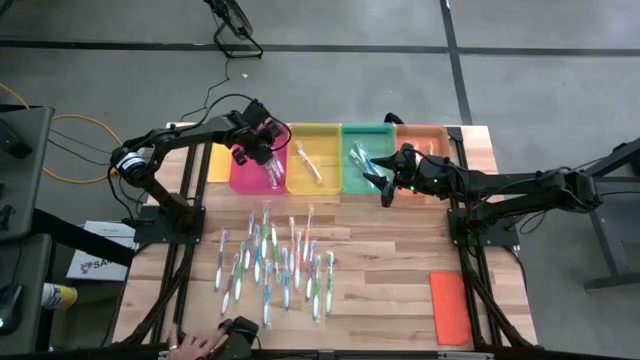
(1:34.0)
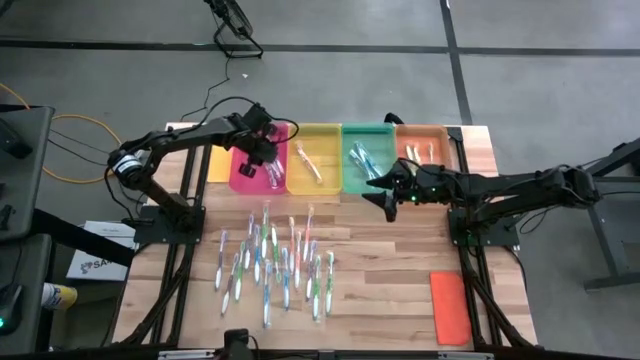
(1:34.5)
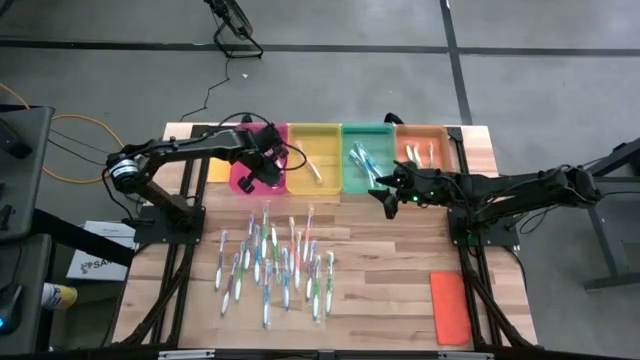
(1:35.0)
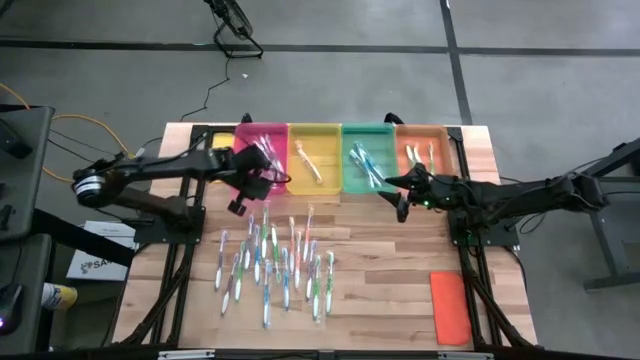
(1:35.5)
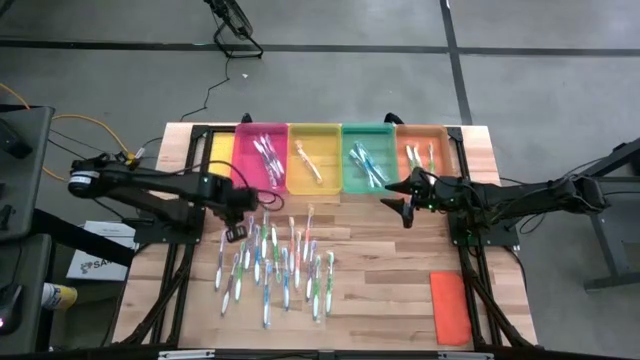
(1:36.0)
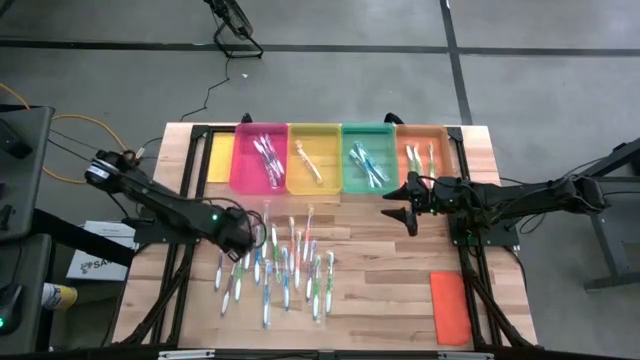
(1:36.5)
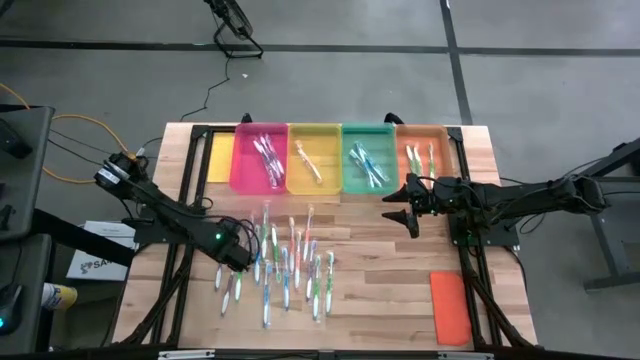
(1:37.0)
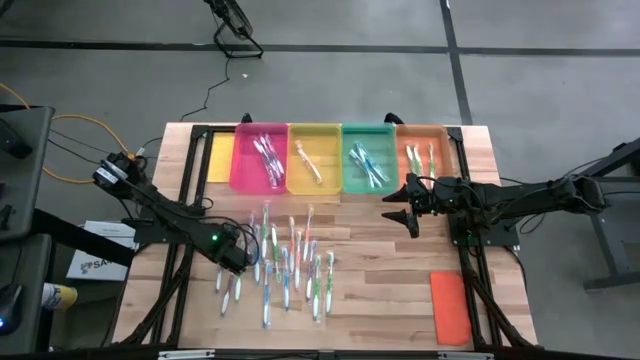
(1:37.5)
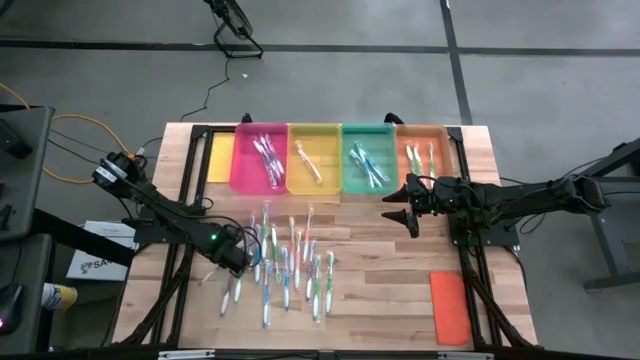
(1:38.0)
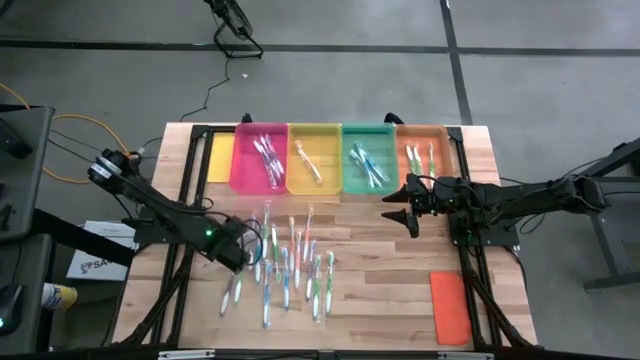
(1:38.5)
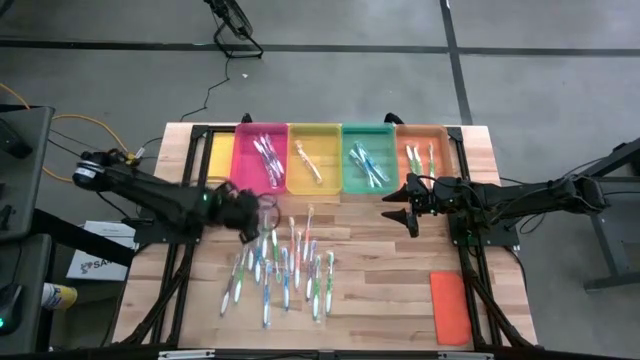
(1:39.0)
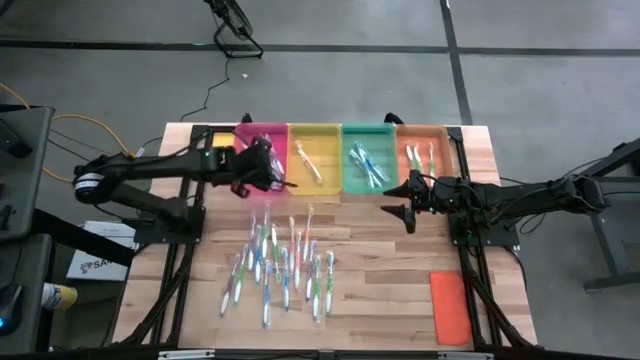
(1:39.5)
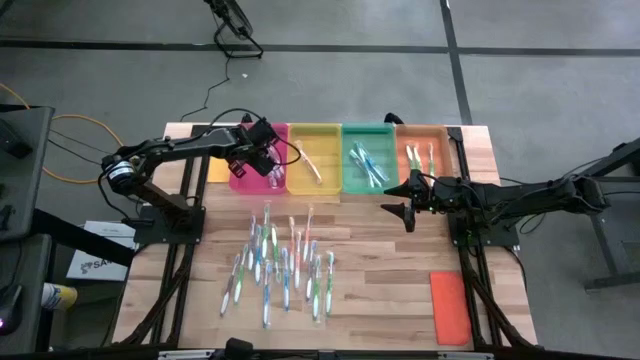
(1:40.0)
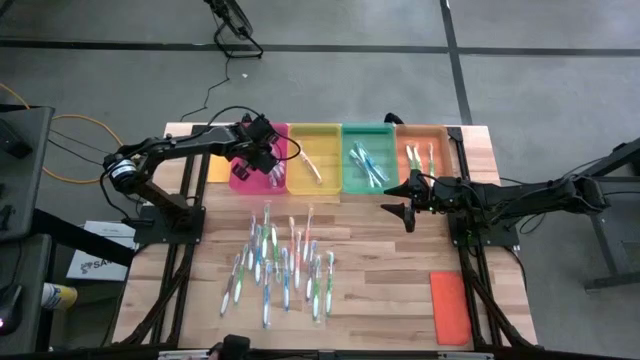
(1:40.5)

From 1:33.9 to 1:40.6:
Task: Pick & Place Toothbrushes
Put the purple toothbrush into the pink bin

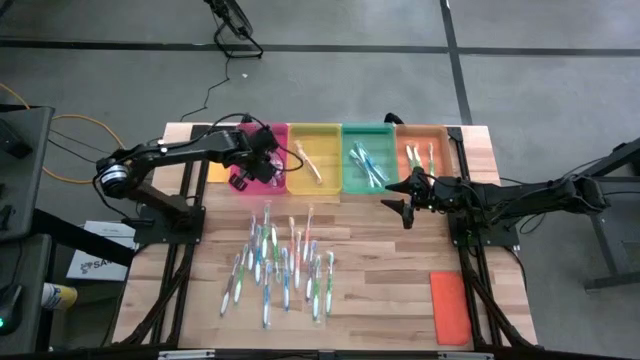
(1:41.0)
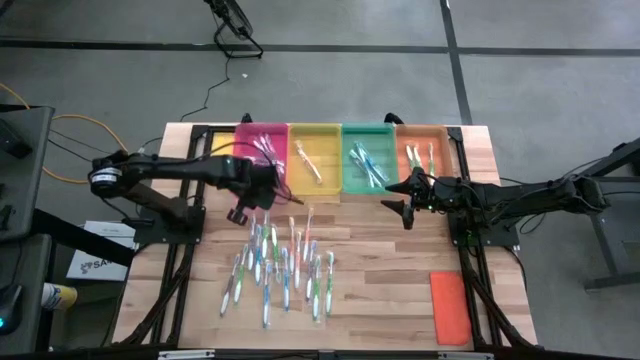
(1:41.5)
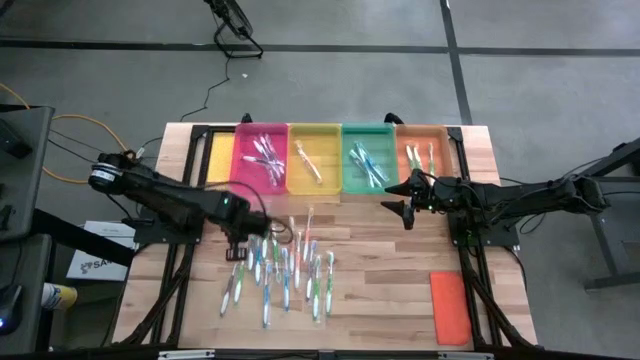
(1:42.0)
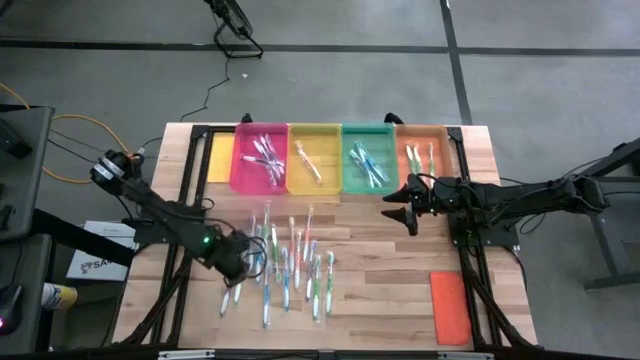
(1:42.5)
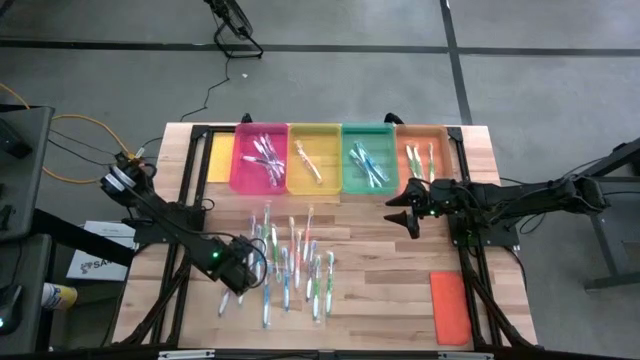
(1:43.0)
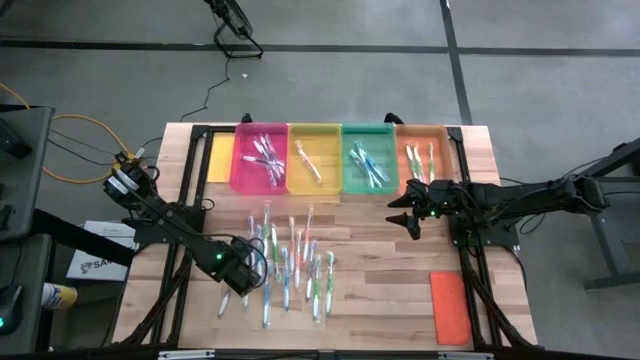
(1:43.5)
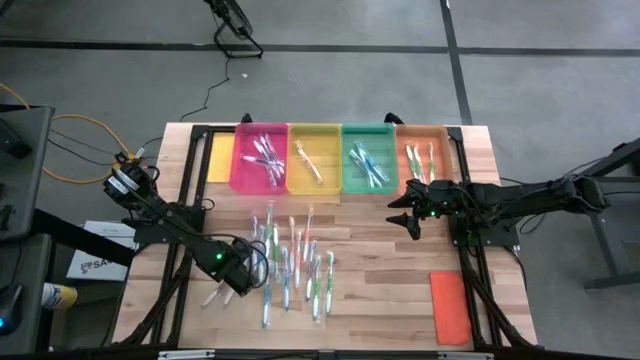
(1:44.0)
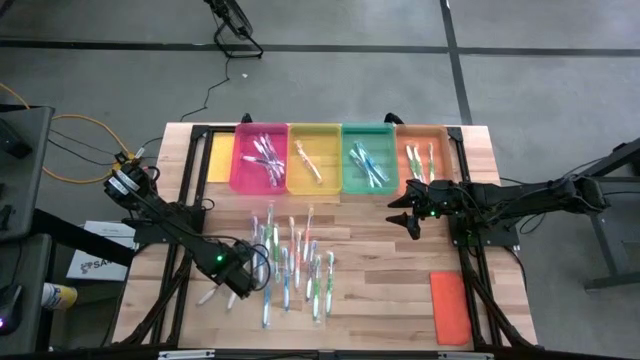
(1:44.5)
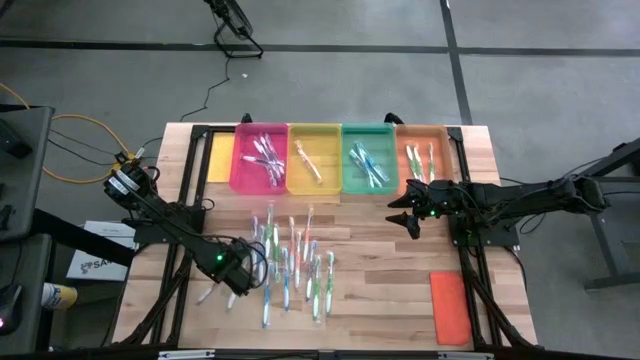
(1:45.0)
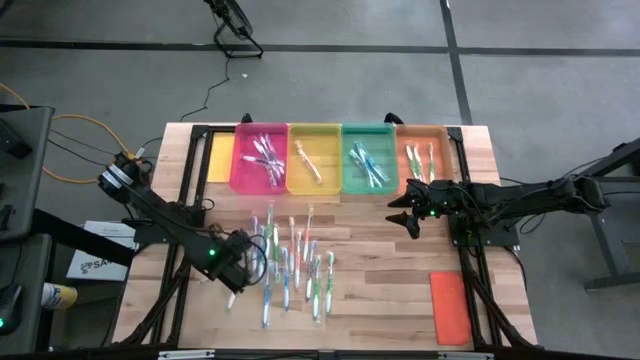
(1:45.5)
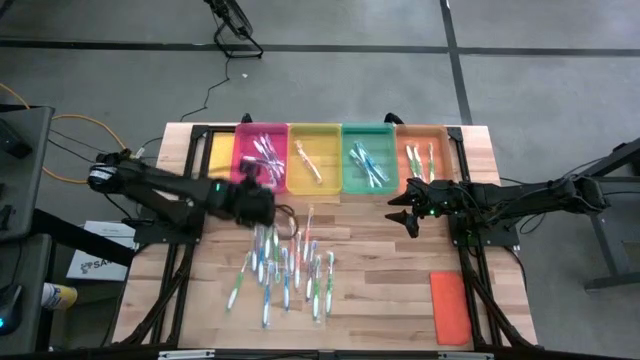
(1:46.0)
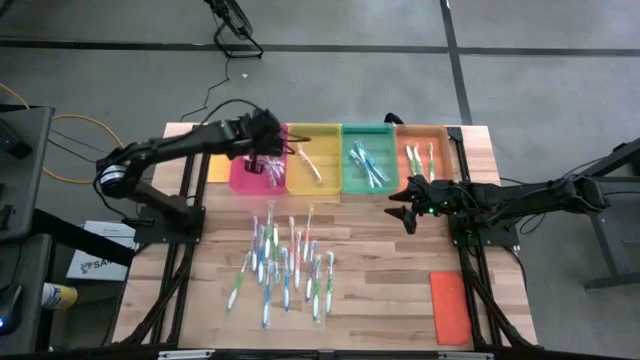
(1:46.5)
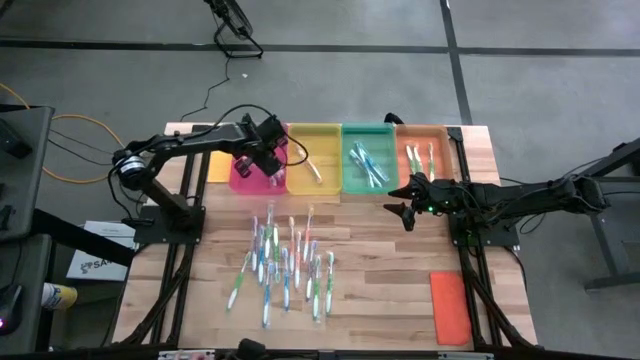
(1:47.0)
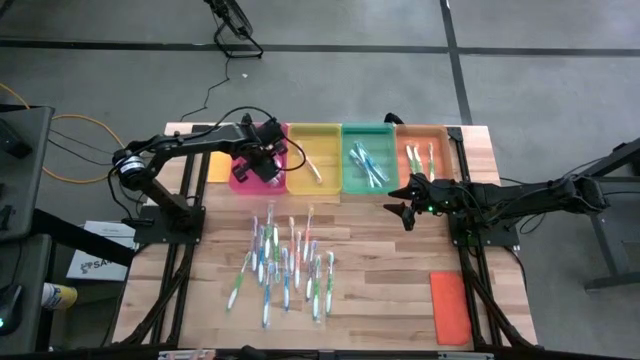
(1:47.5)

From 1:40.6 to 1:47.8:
Put the purple toothbrush into the pink bin

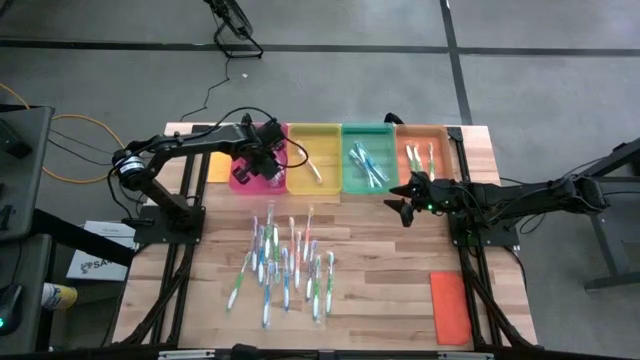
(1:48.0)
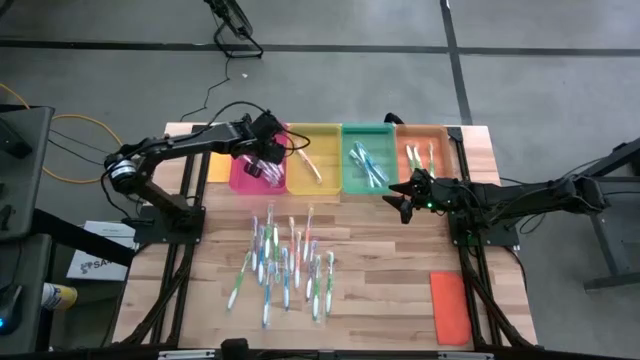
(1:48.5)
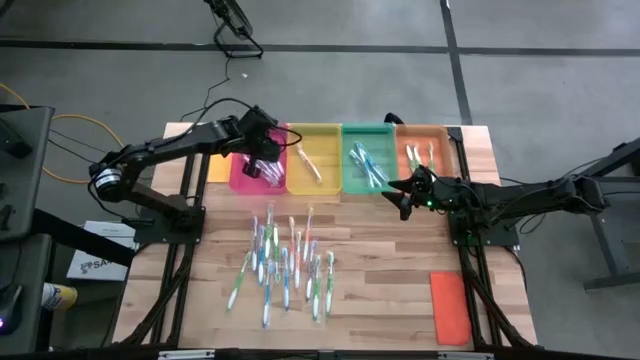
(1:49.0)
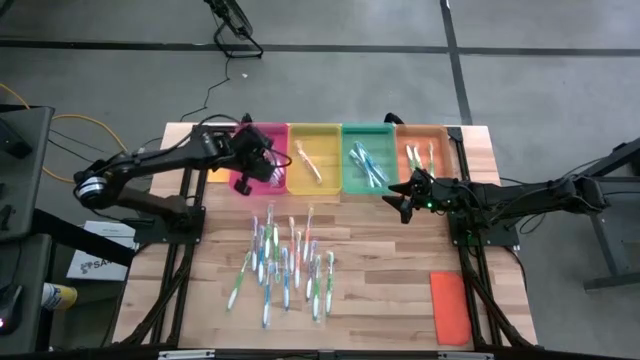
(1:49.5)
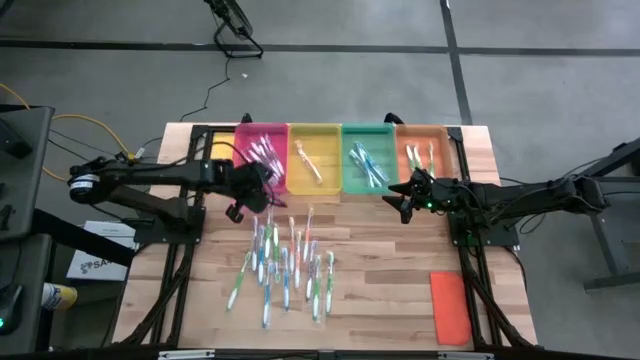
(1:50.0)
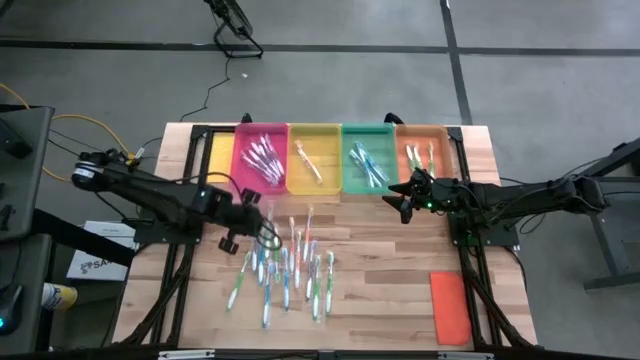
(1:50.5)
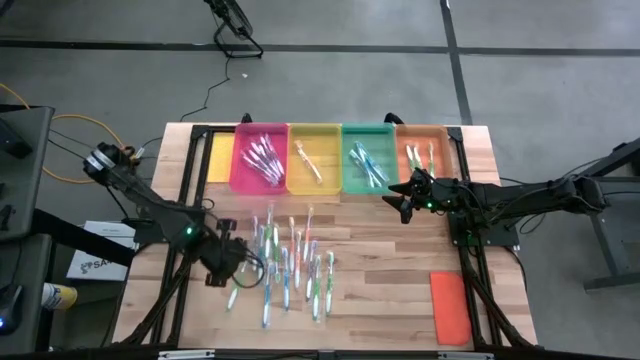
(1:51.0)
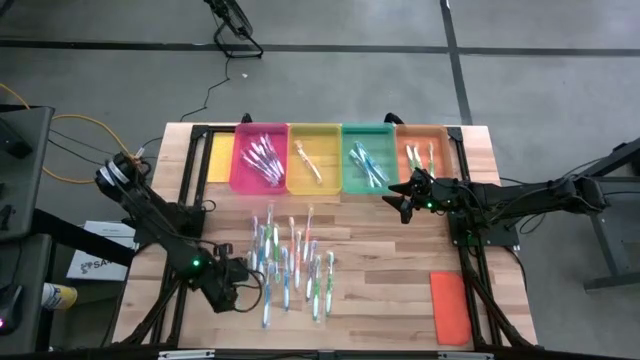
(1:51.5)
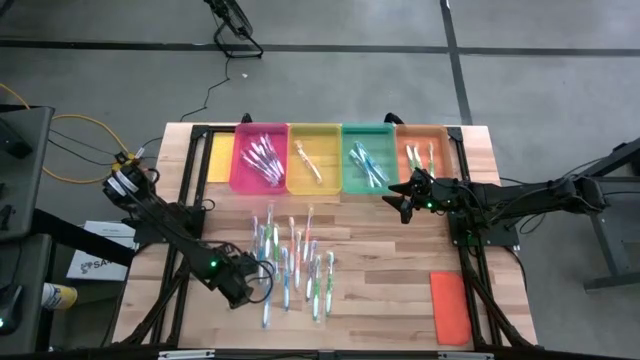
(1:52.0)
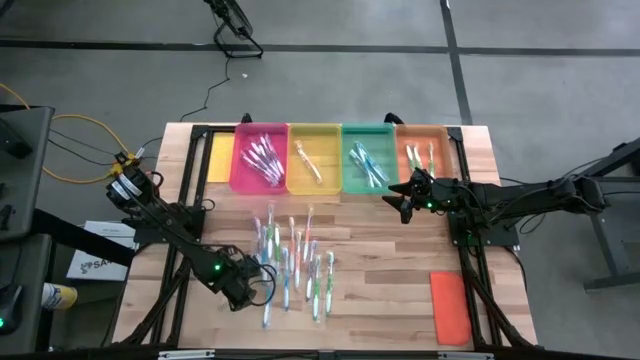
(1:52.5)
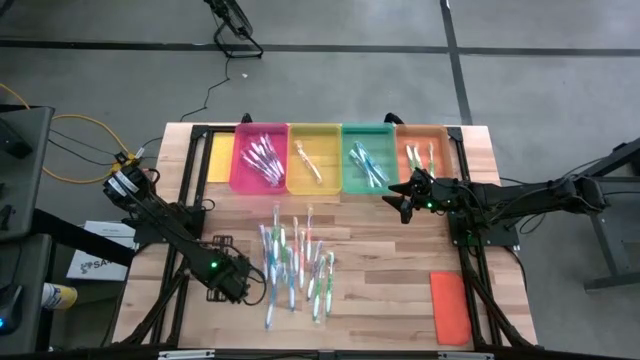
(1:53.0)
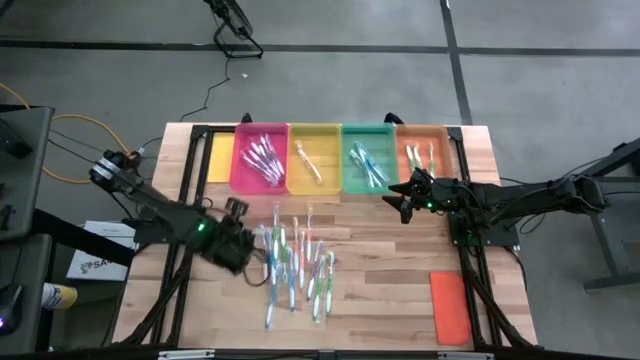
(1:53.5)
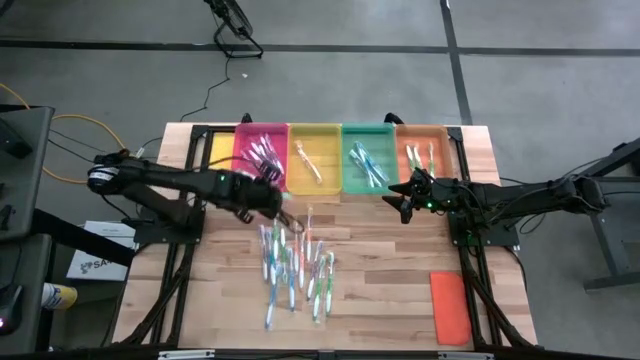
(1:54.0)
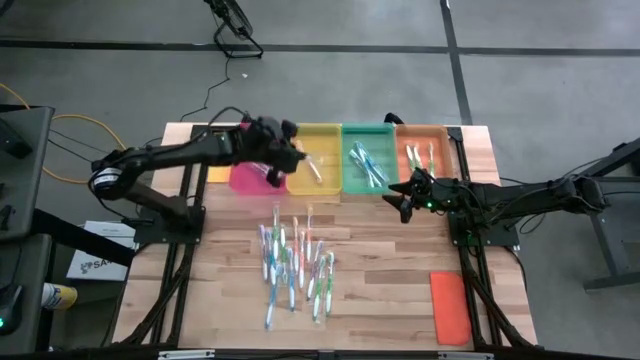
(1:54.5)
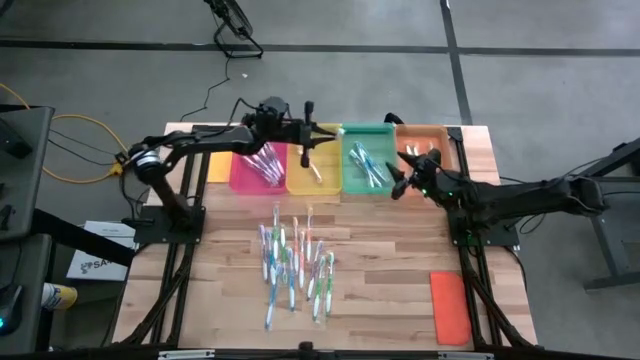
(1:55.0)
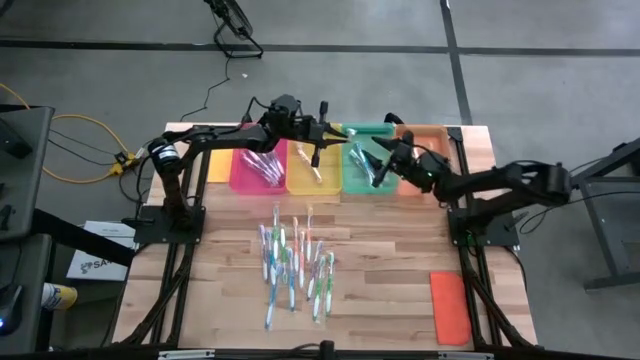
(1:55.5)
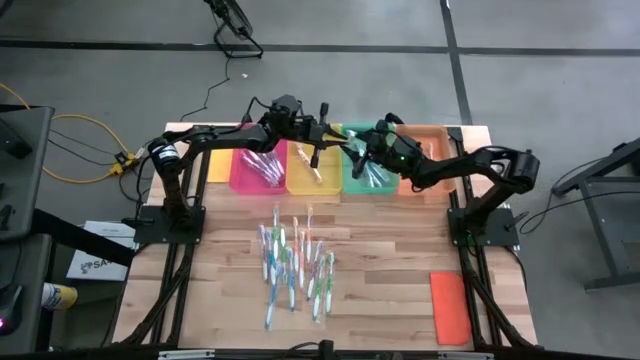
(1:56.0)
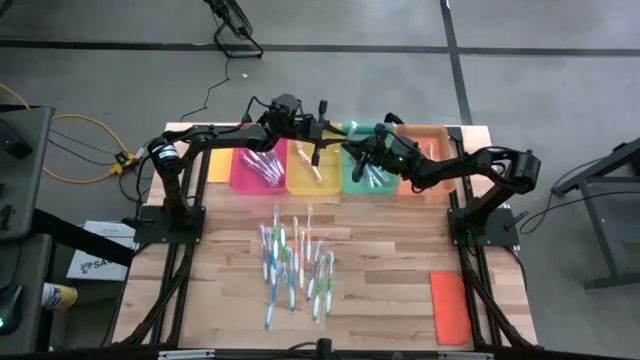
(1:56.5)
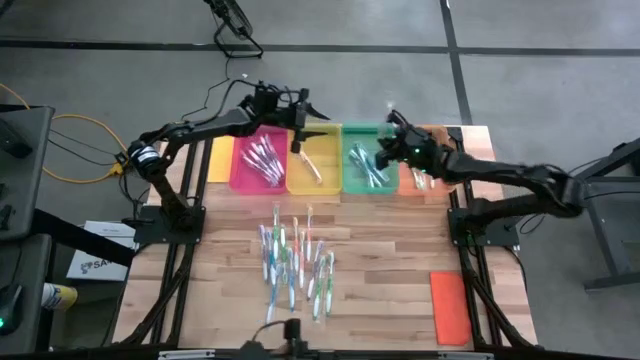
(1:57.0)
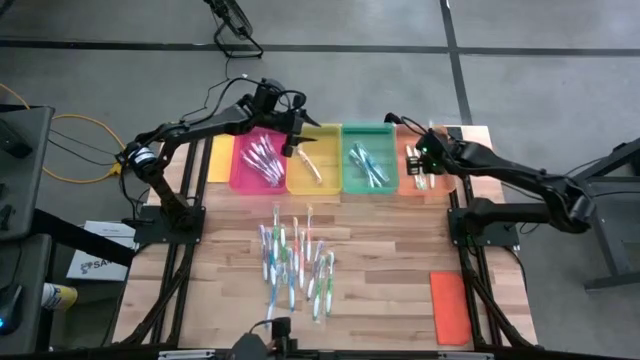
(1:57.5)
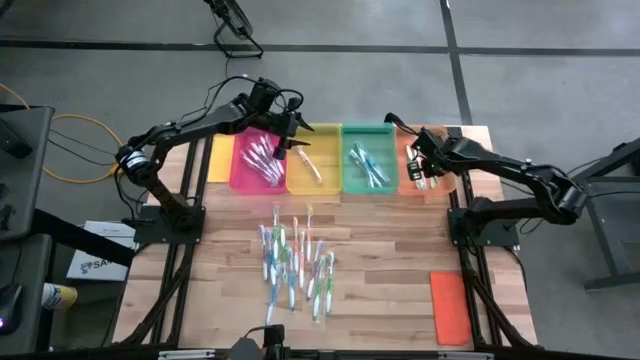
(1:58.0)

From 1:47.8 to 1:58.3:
Put the green toothbrush into the orange bin
